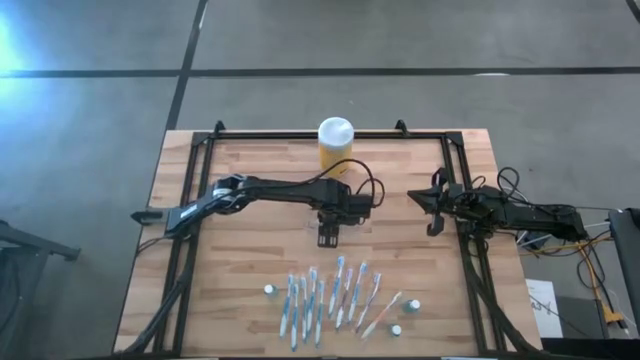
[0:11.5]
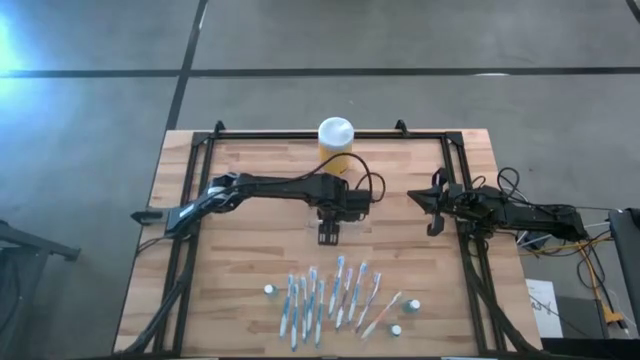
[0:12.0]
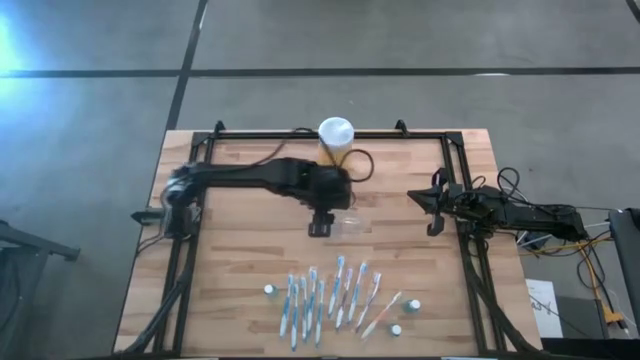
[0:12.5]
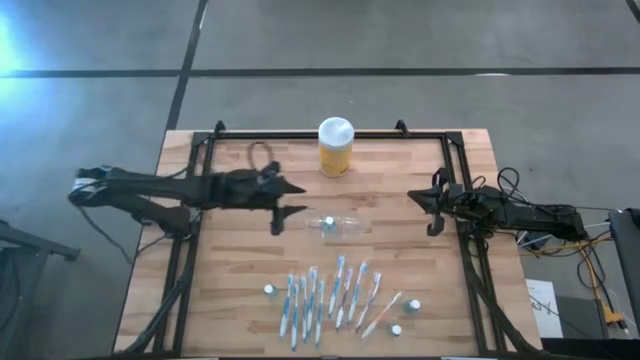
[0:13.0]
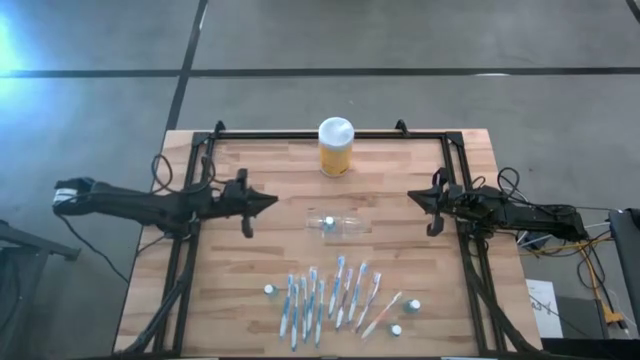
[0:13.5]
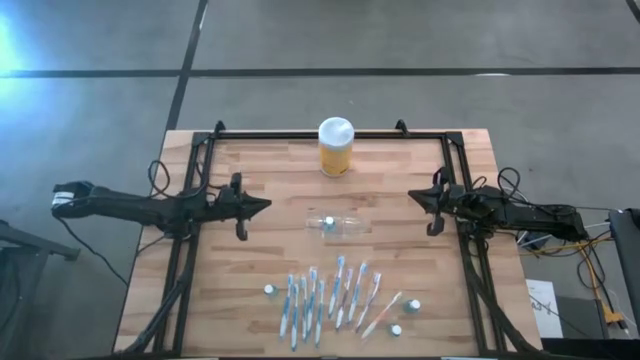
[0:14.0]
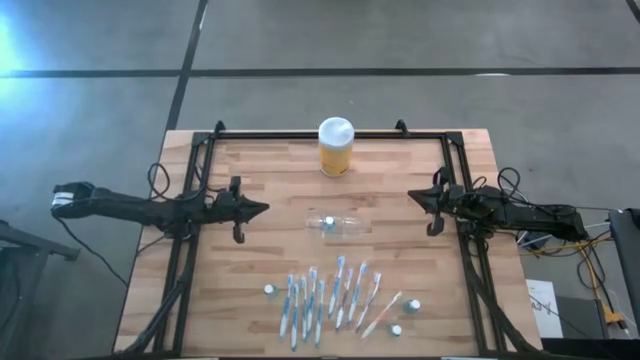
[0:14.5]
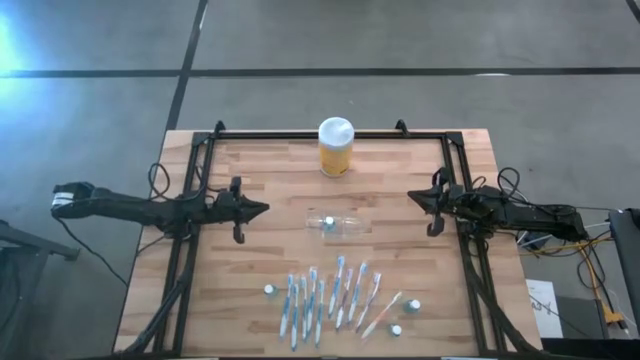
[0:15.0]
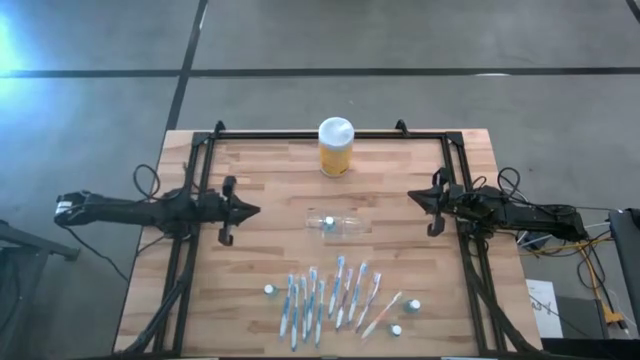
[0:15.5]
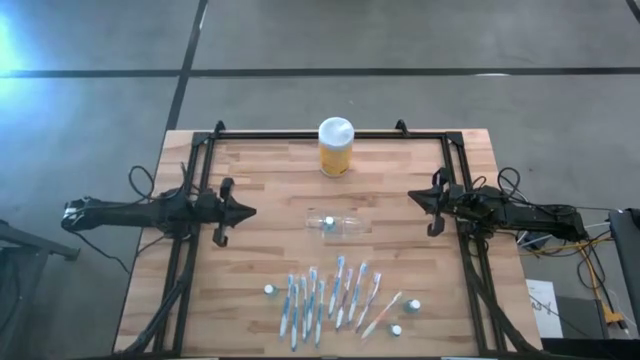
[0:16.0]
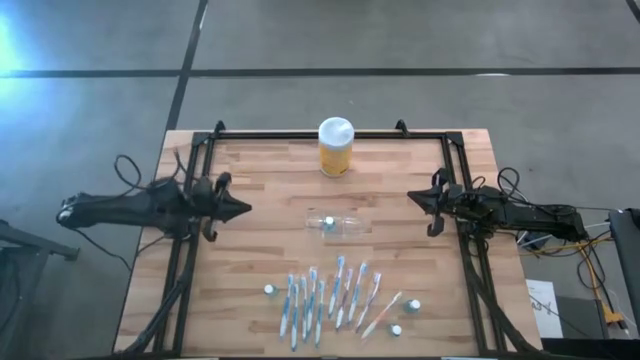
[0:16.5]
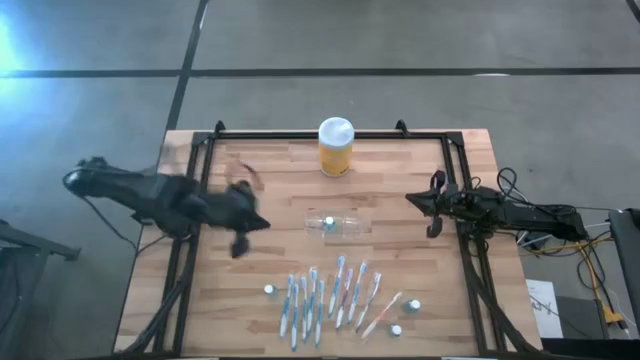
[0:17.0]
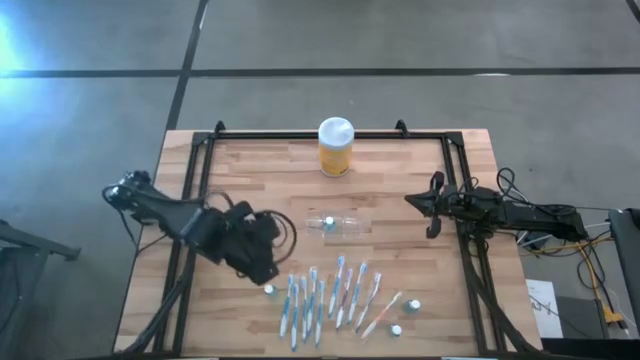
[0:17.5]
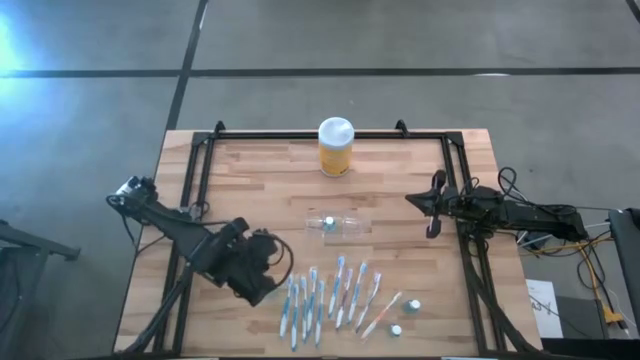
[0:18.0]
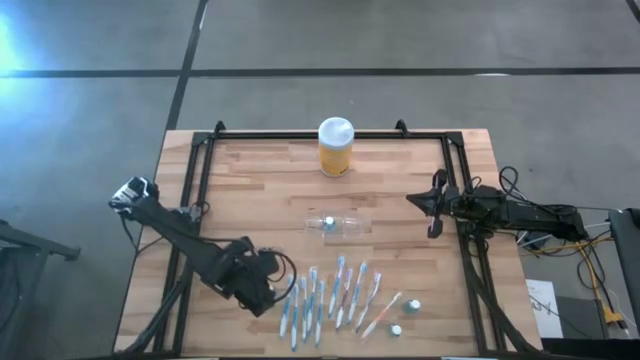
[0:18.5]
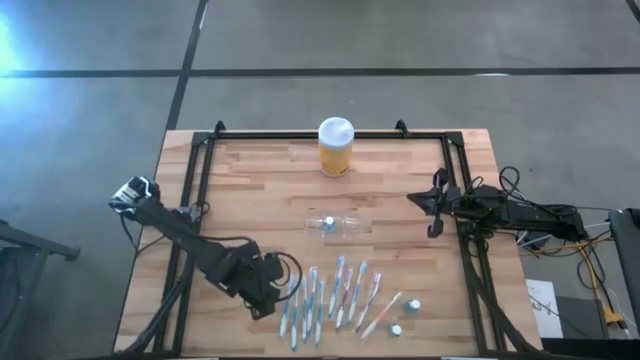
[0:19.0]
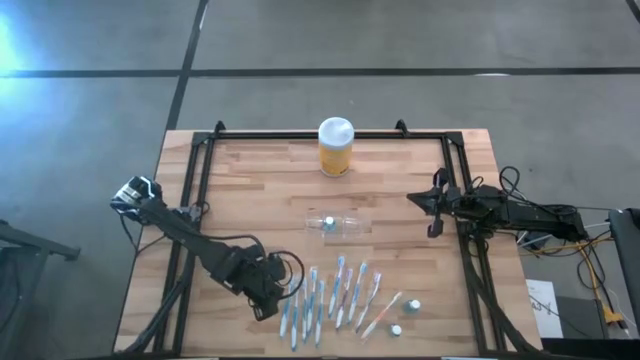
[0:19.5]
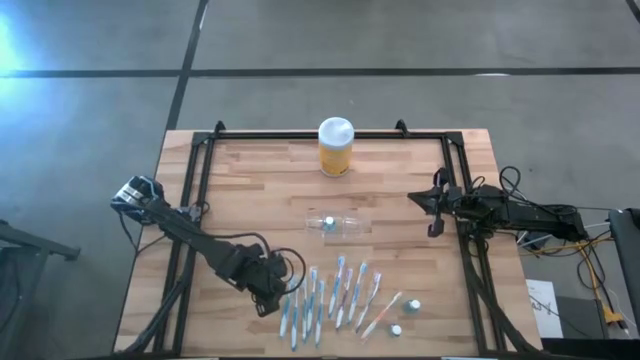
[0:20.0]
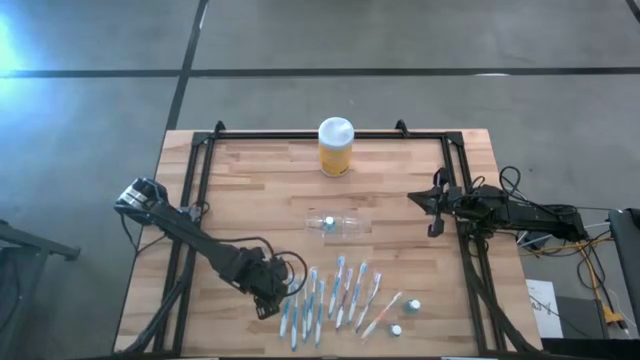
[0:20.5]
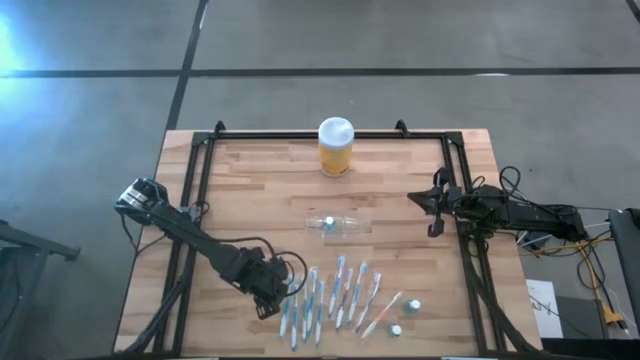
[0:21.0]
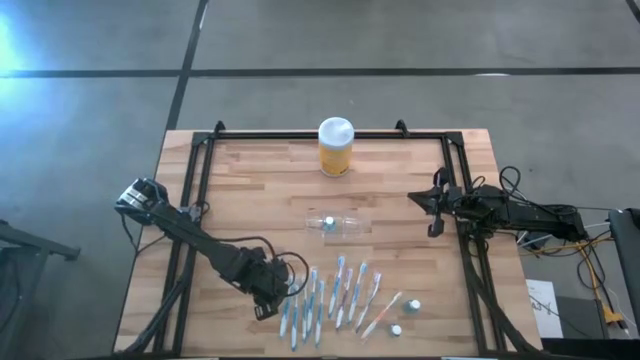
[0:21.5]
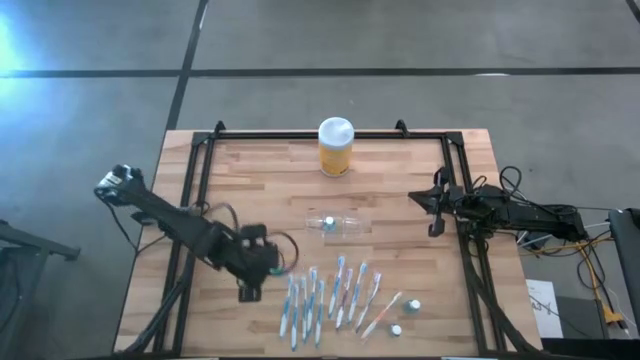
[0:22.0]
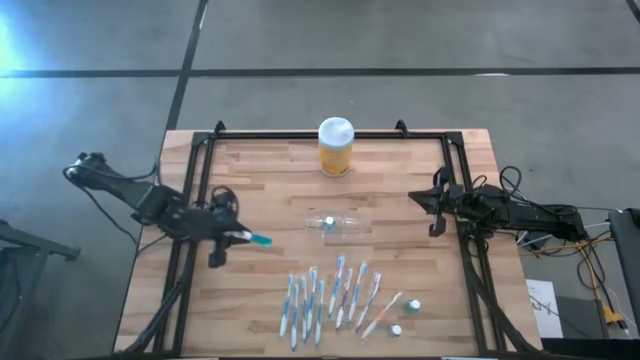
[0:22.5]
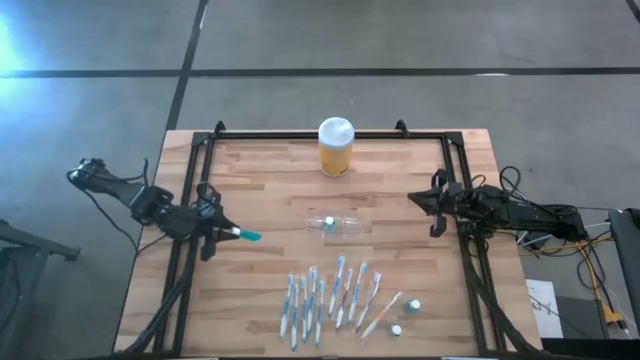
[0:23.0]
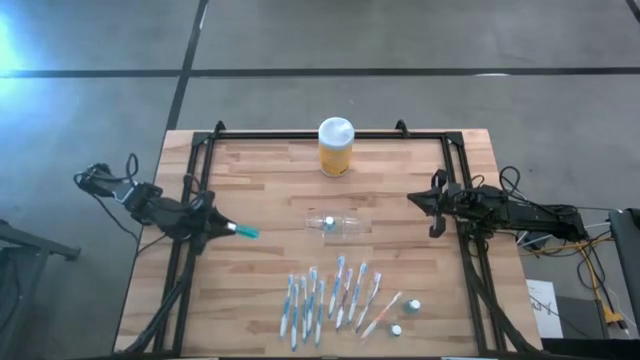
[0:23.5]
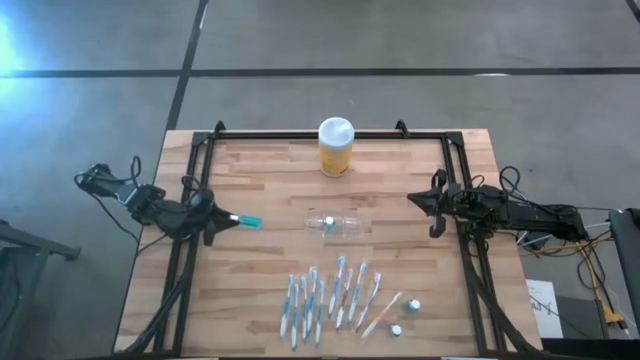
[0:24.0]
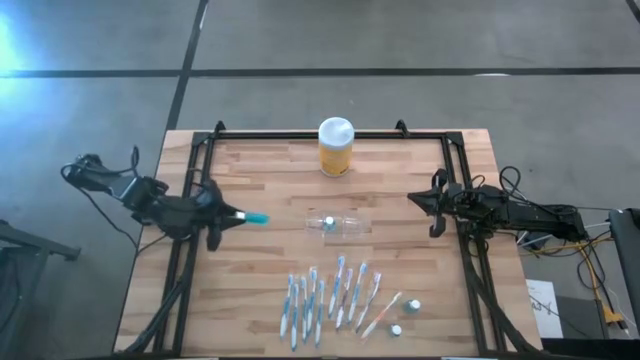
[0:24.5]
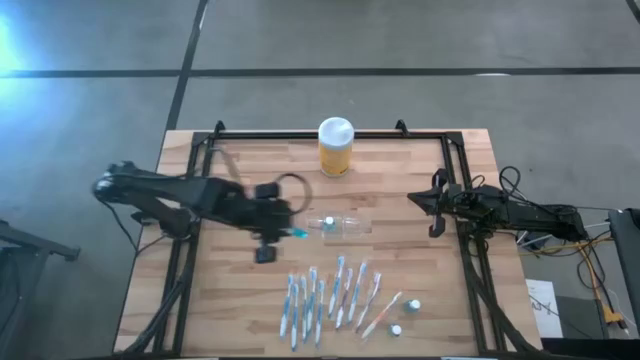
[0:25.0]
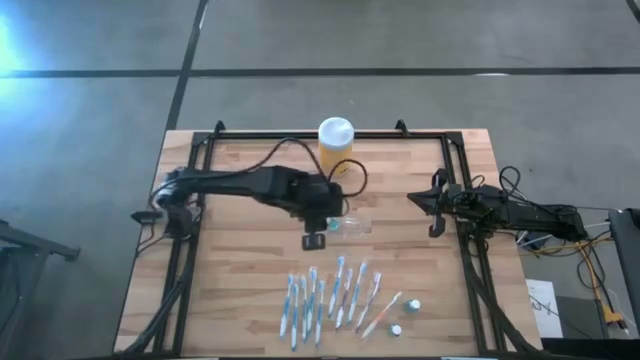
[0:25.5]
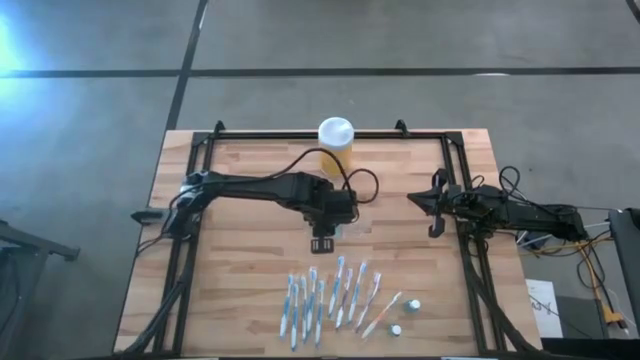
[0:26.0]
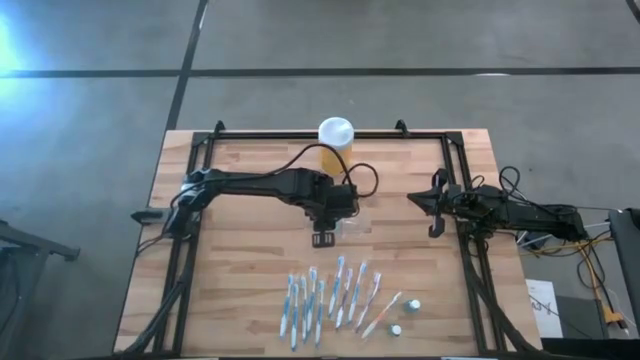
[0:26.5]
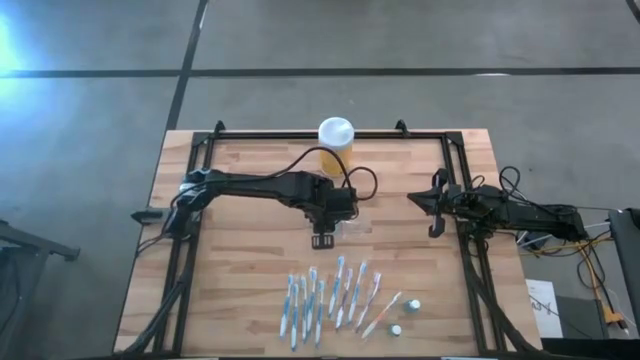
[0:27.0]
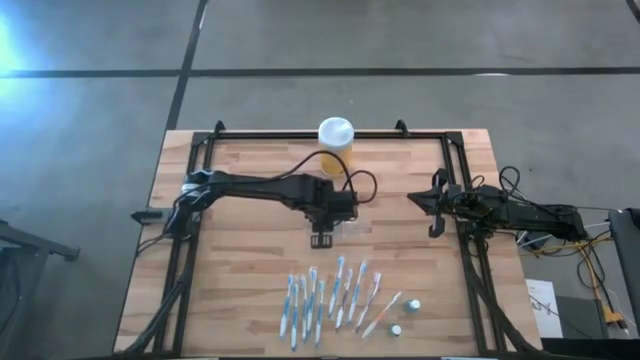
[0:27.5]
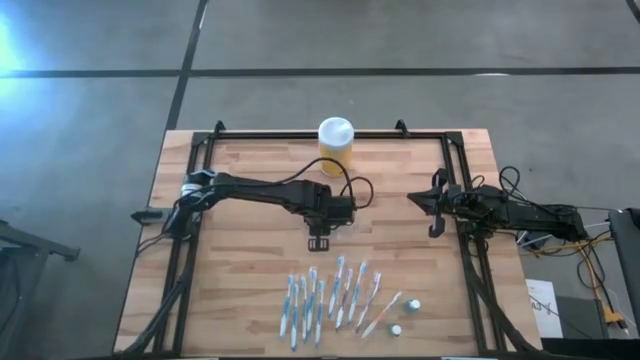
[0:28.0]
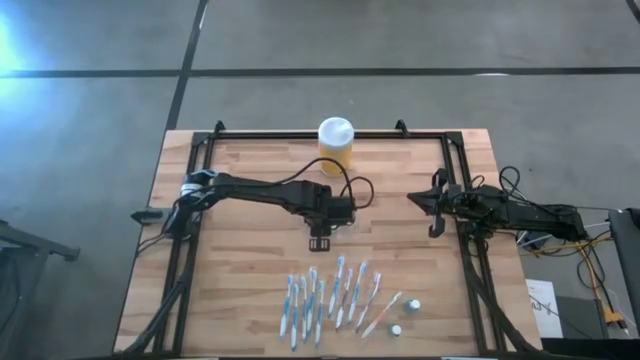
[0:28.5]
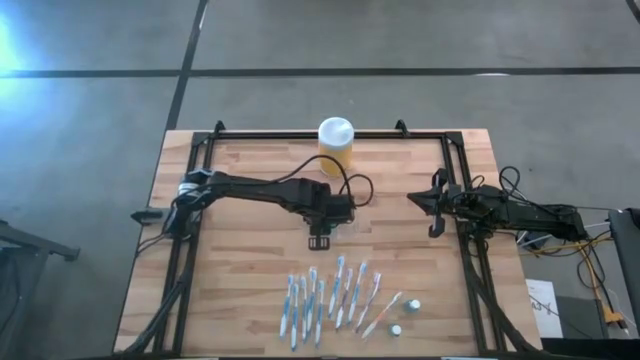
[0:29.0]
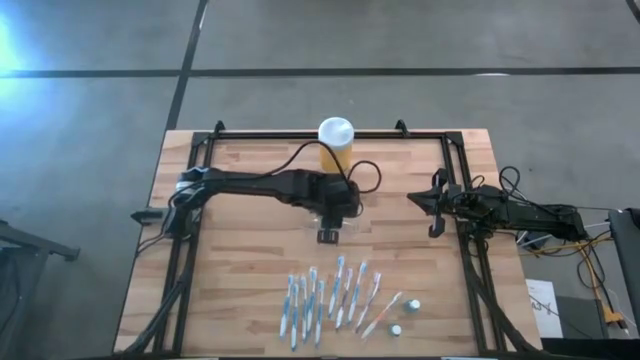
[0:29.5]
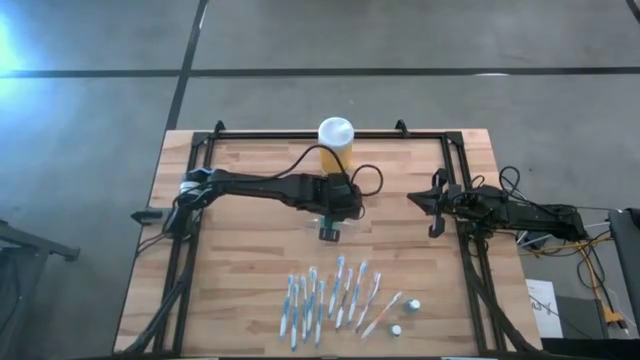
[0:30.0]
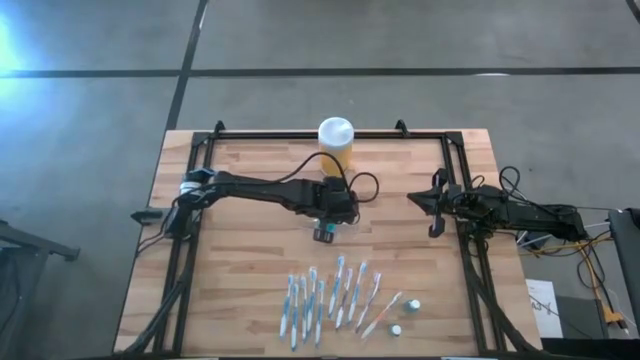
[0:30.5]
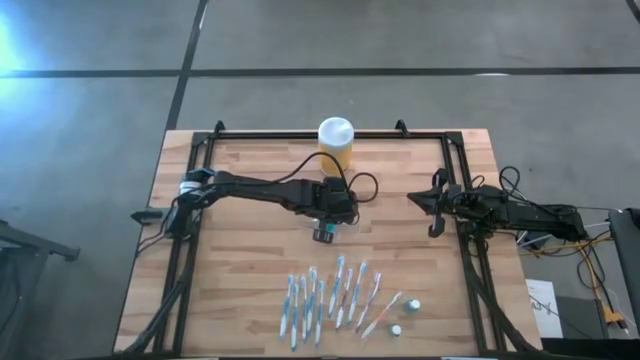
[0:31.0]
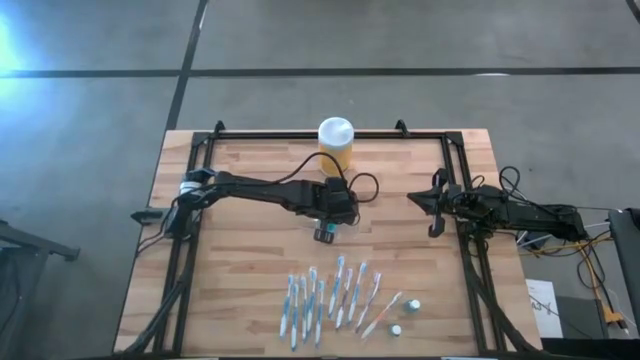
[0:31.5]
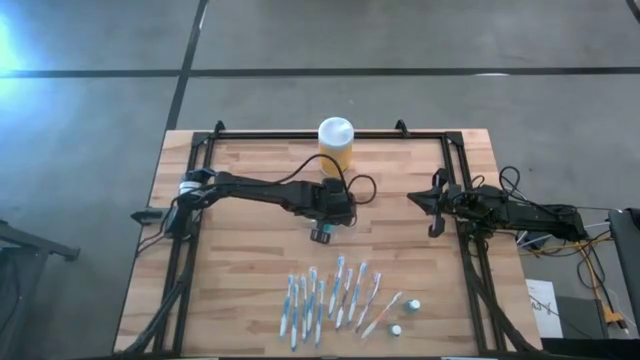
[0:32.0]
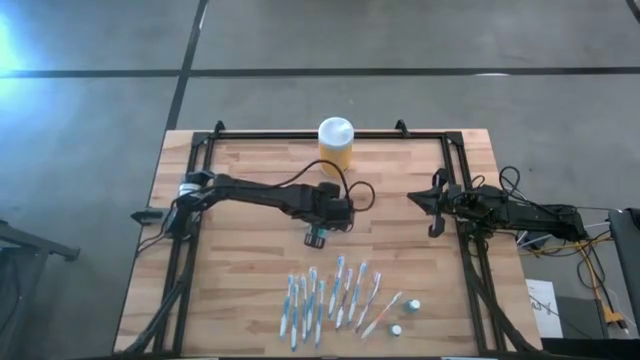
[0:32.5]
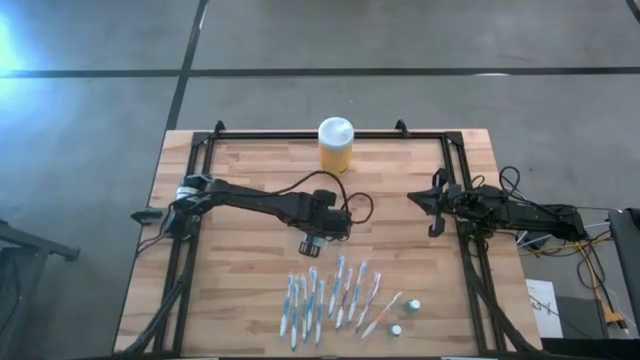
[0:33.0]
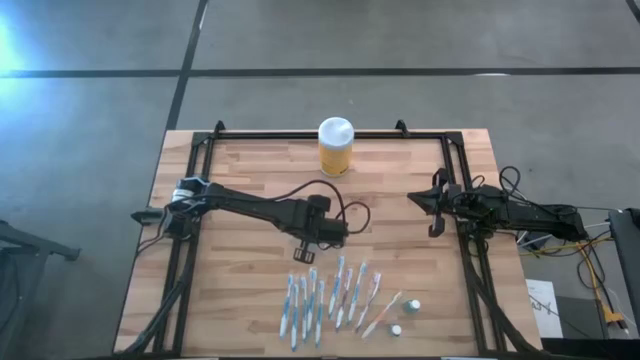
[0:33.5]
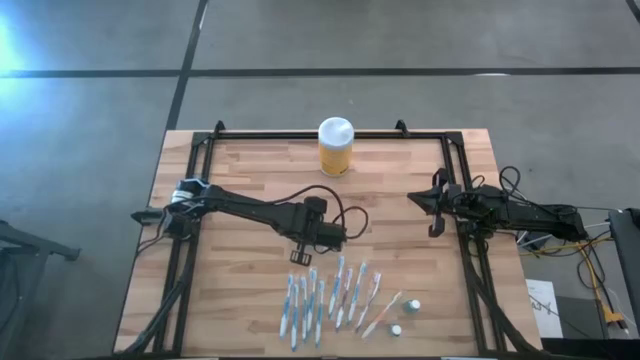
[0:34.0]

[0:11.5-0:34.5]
Task: Pick & Place toothbrushing station
Put the blue mouthwash into the transparent organizer
